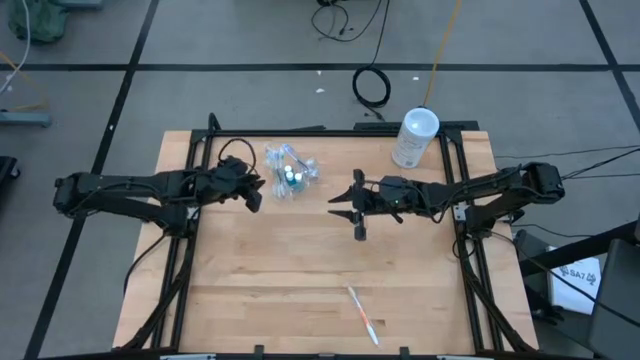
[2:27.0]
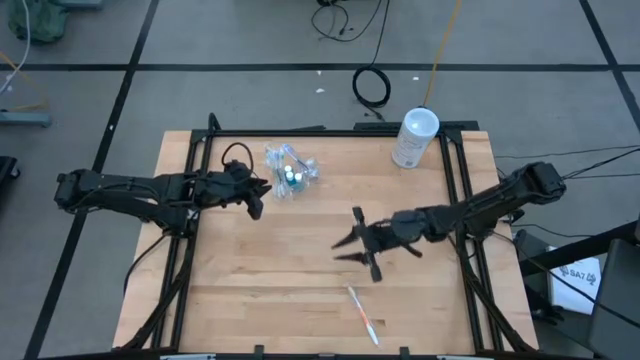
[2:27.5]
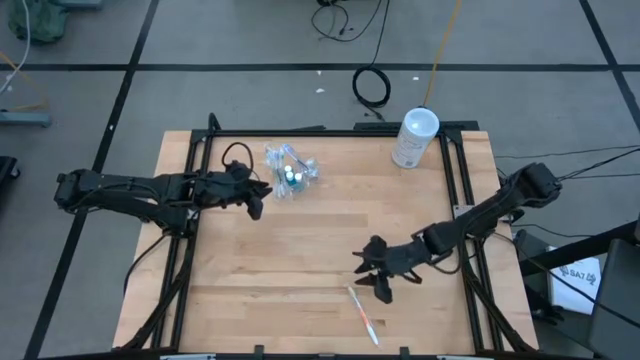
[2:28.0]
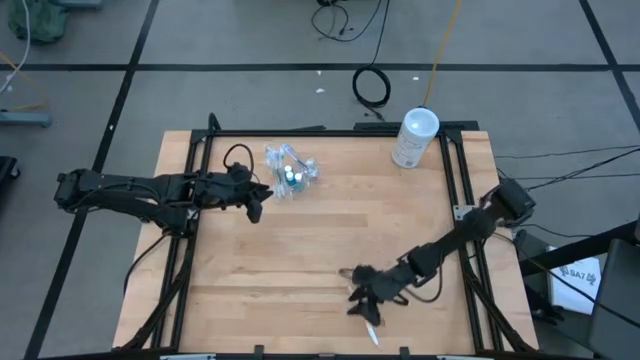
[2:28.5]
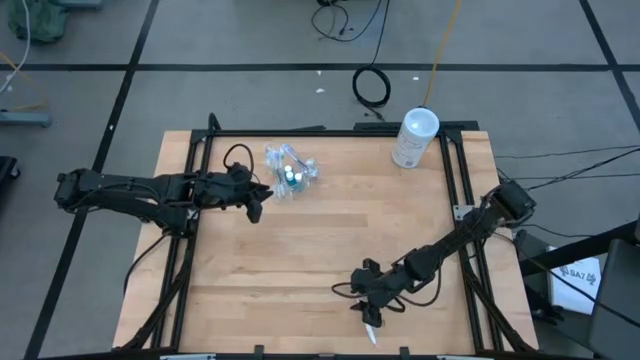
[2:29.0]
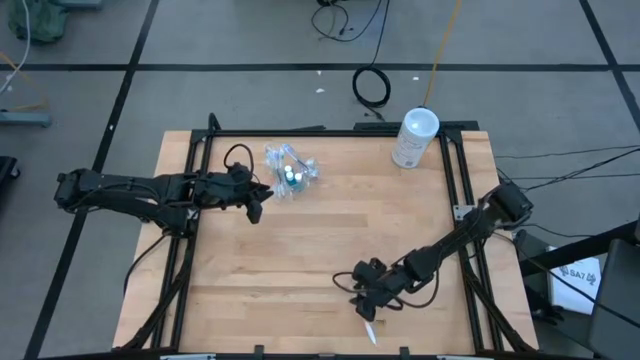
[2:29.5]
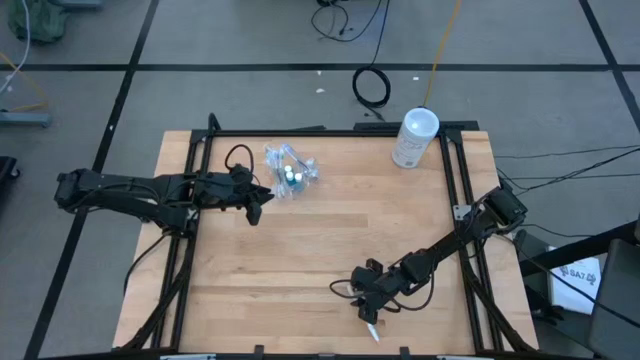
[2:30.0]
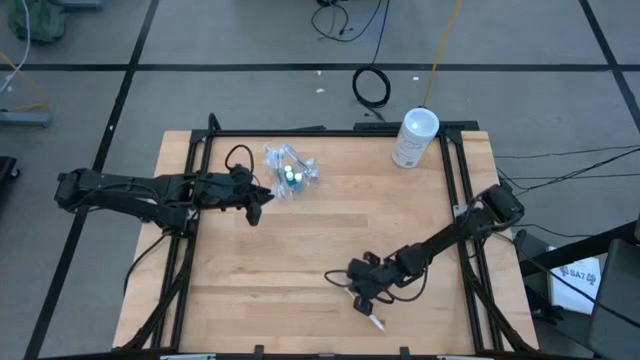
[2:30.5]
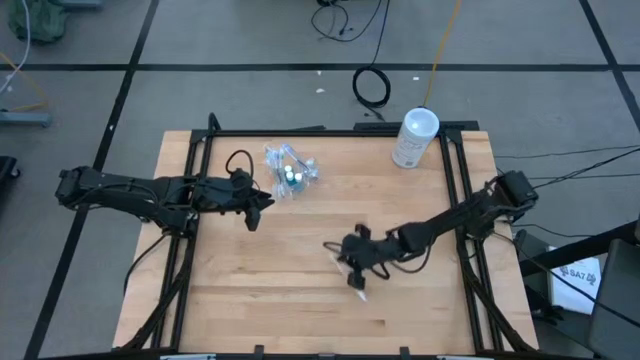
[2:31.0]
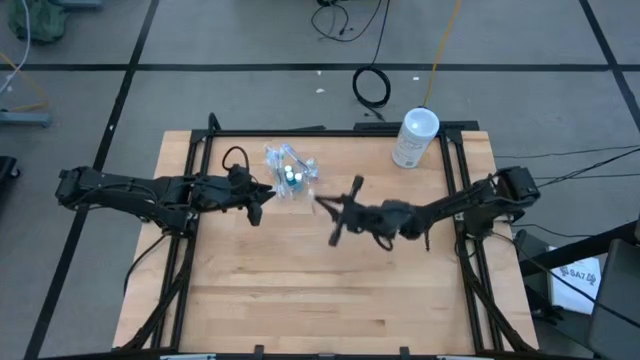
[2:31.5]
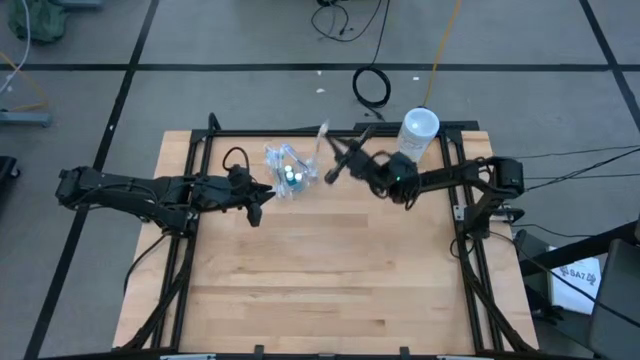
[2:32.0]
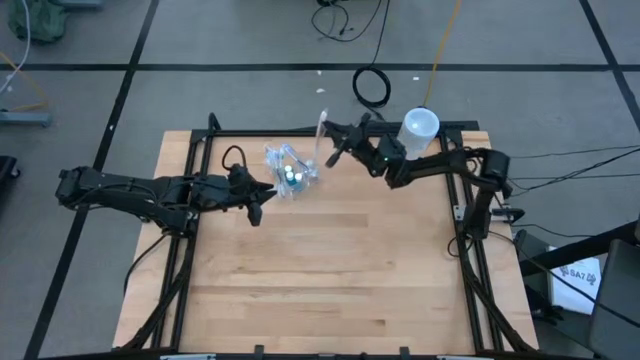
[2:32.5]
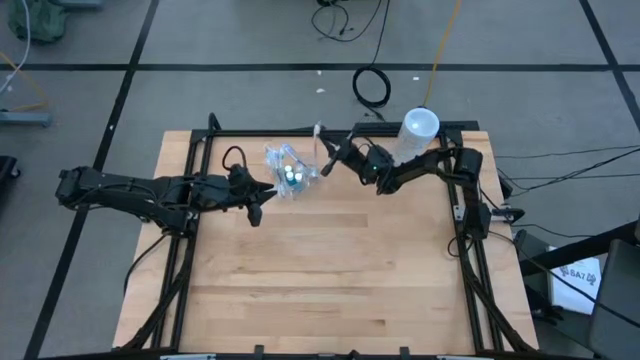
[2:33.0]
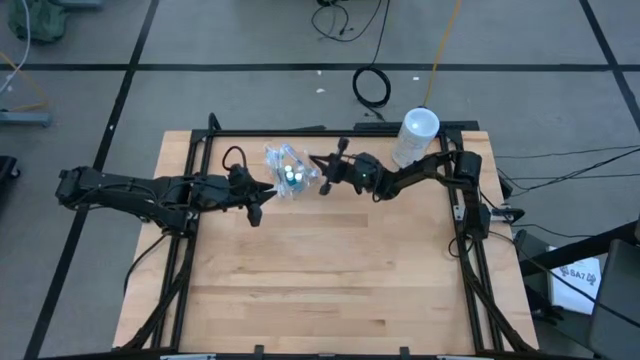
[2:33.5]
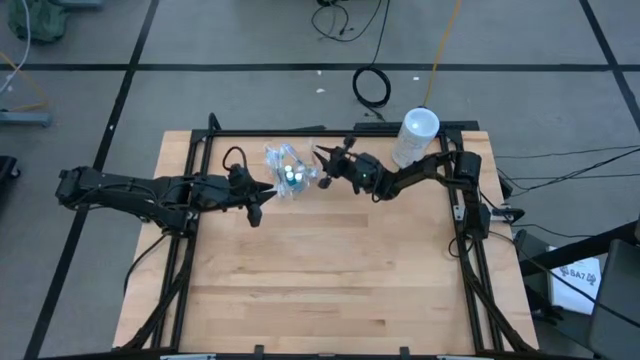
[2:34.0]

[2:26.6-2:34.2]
Task: Pick & Place toothbrushing station
Put the orange toothbrush into the transparent organizer

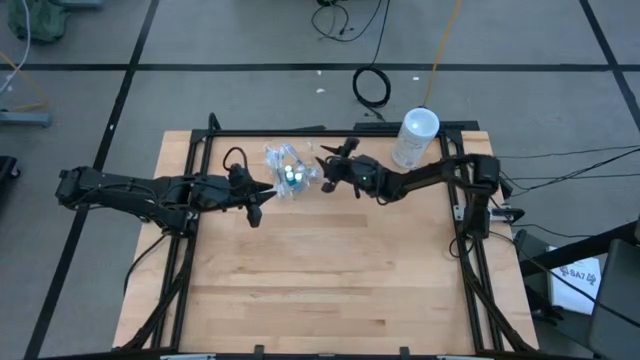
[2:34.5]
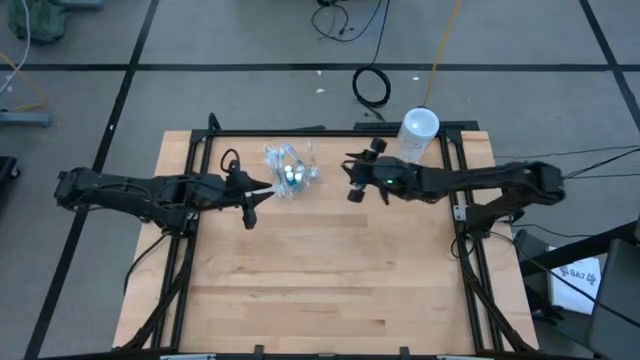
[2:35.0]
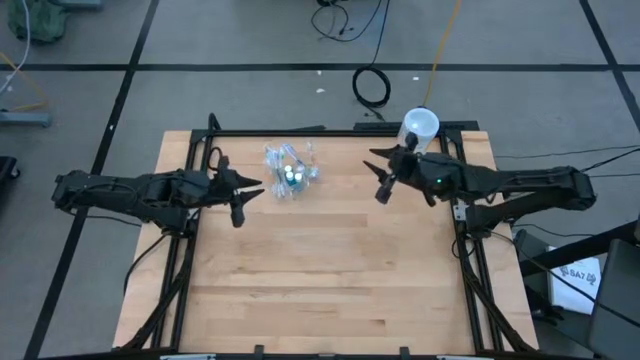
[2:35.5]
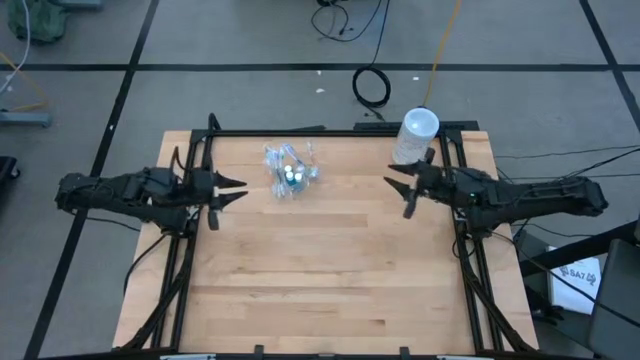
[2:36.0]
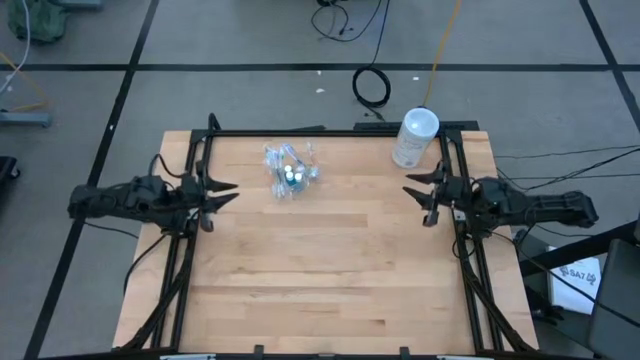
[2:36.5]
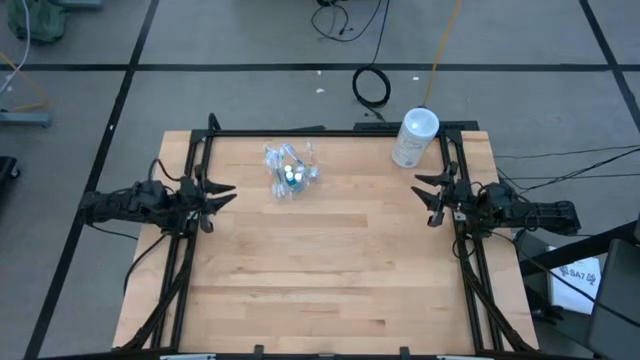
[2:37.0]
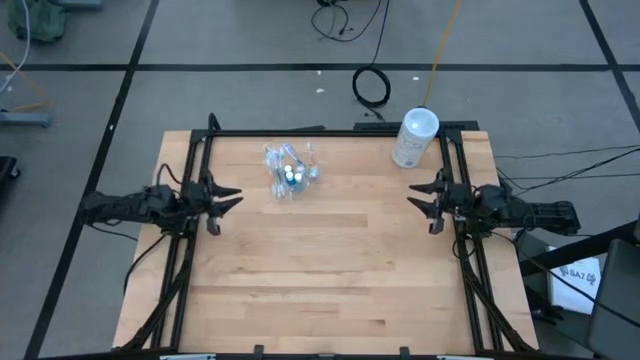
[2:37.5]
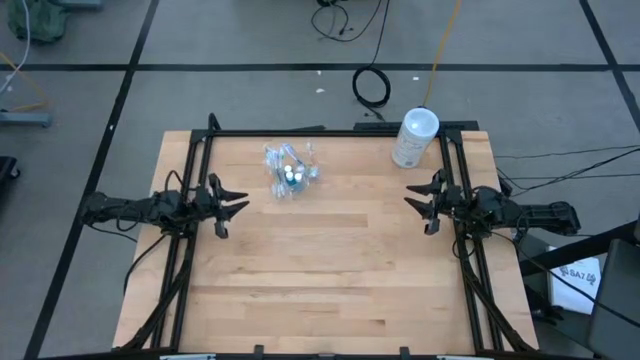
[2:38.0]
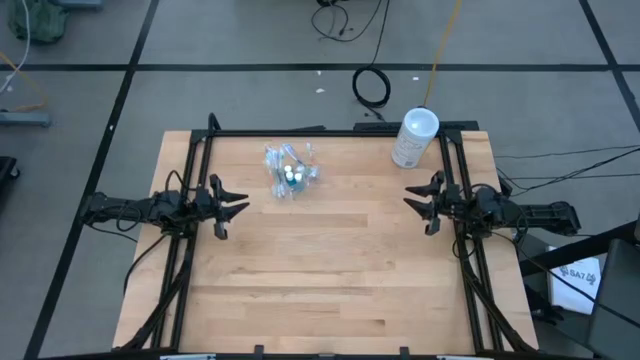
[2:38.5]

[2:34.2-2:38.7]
Return to Home Position

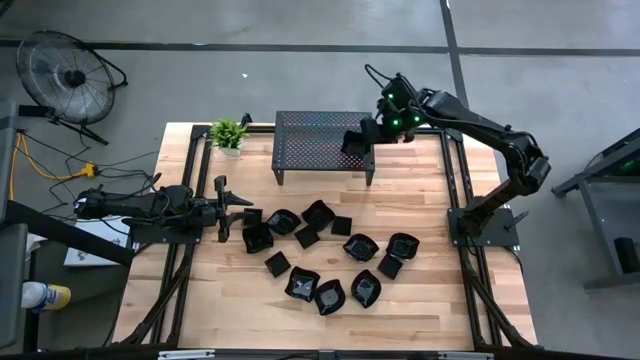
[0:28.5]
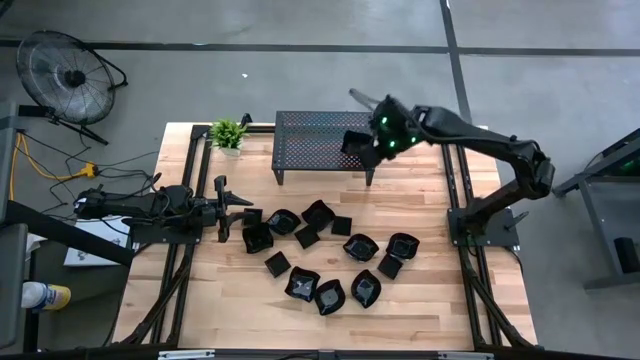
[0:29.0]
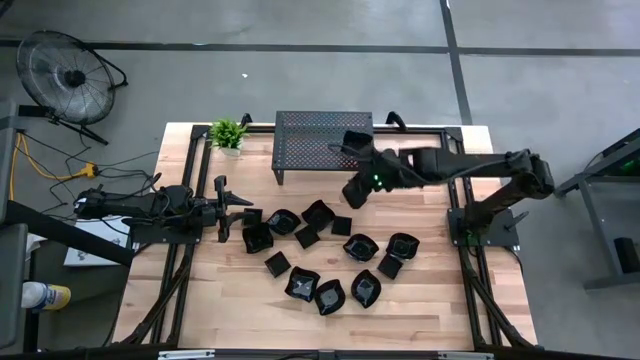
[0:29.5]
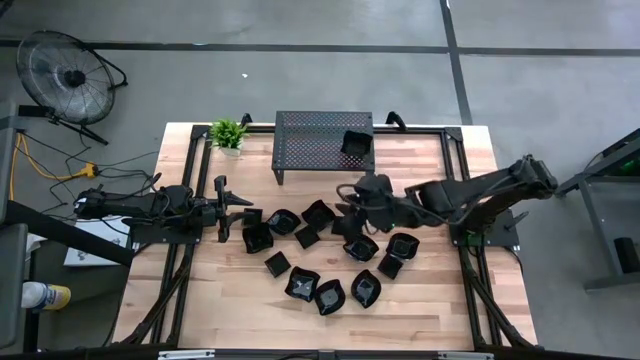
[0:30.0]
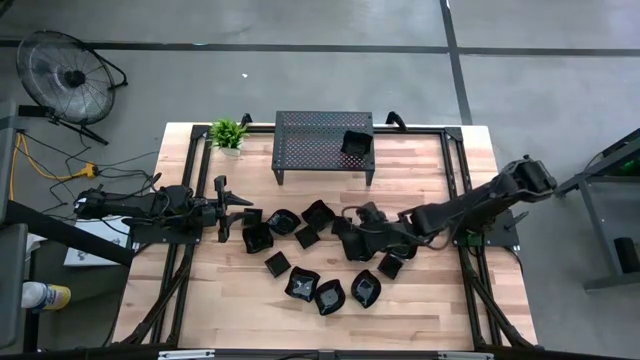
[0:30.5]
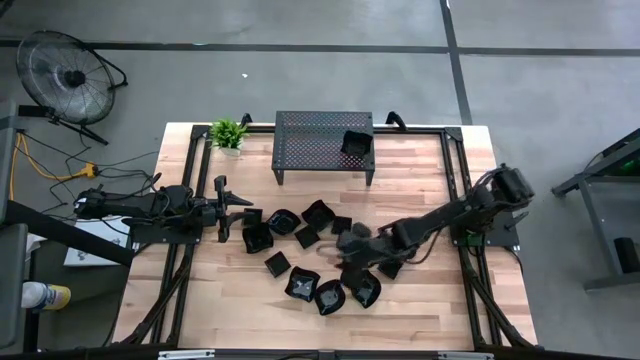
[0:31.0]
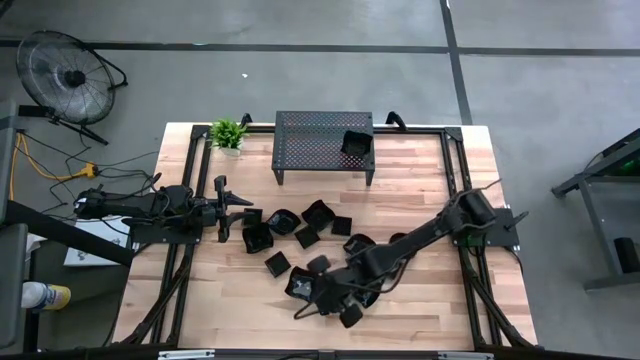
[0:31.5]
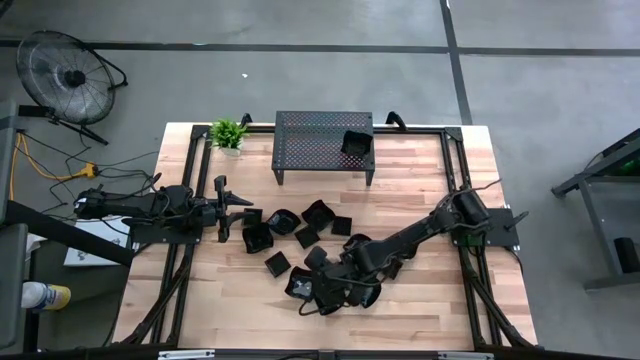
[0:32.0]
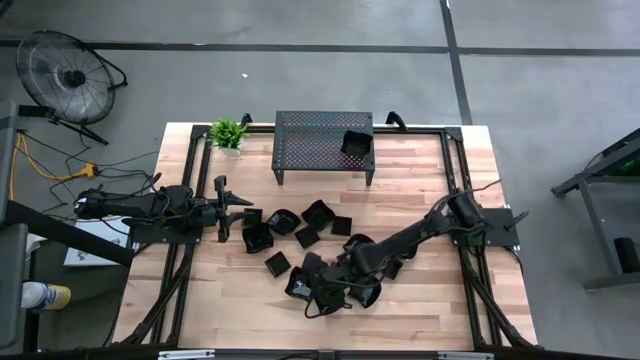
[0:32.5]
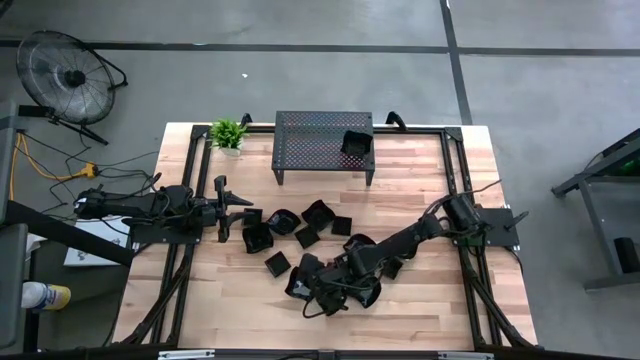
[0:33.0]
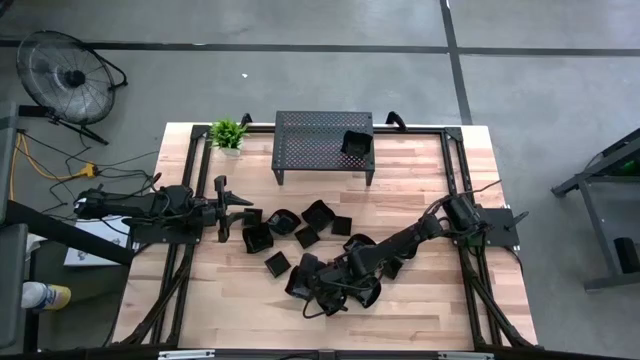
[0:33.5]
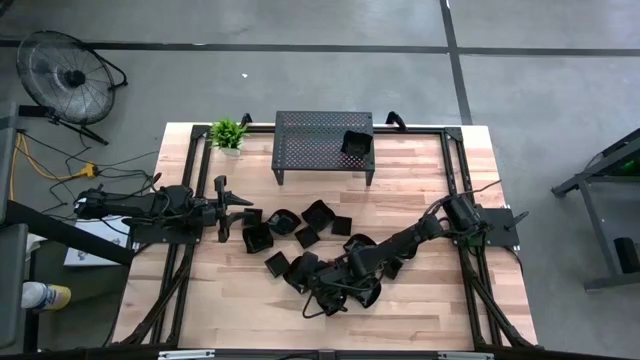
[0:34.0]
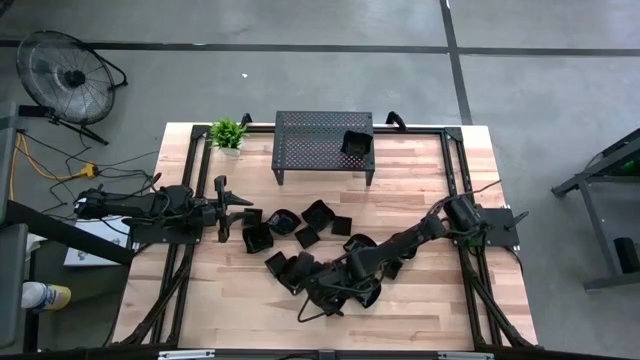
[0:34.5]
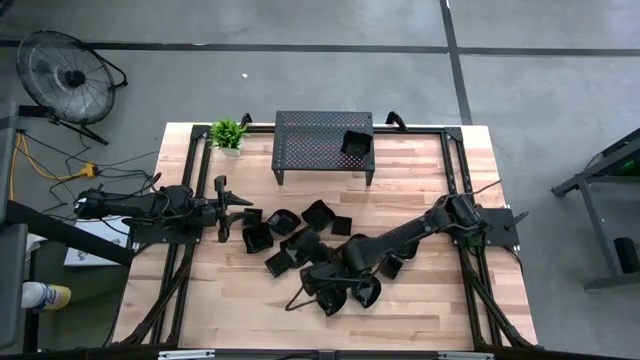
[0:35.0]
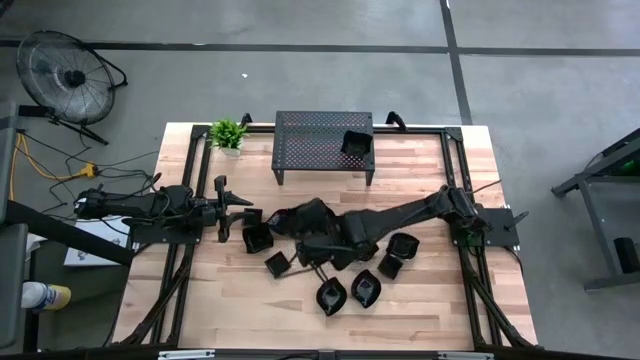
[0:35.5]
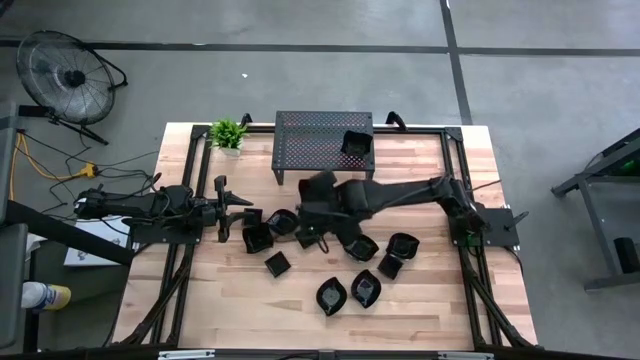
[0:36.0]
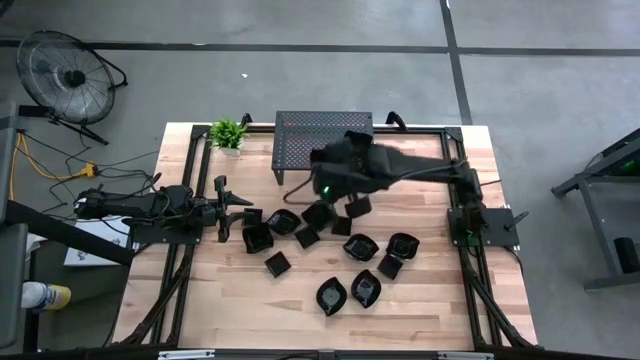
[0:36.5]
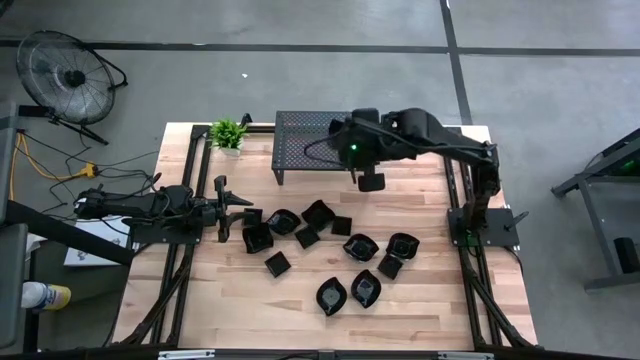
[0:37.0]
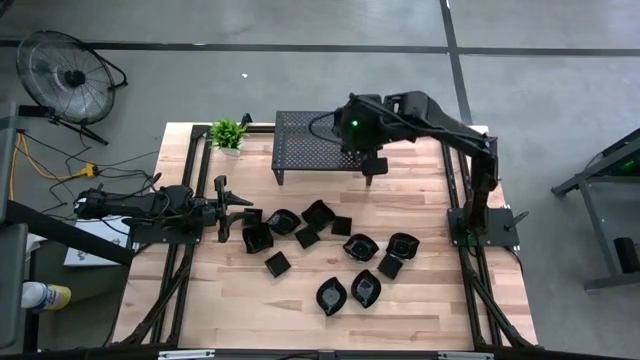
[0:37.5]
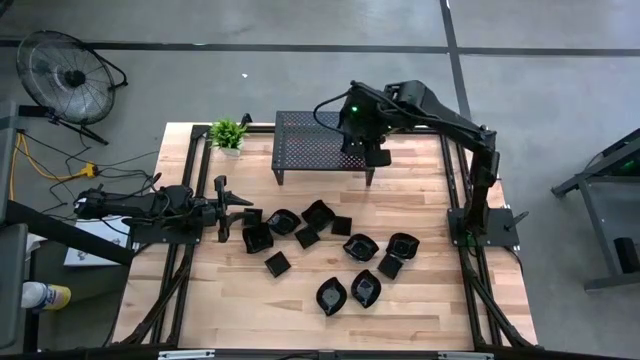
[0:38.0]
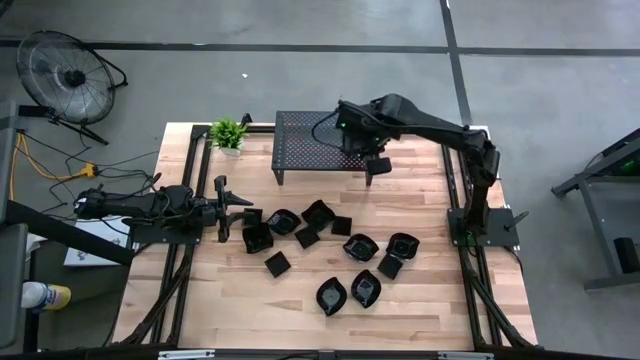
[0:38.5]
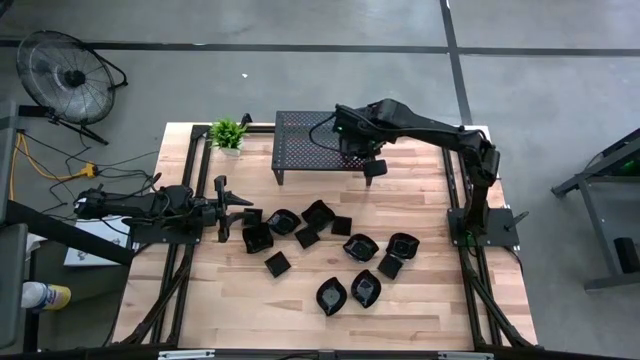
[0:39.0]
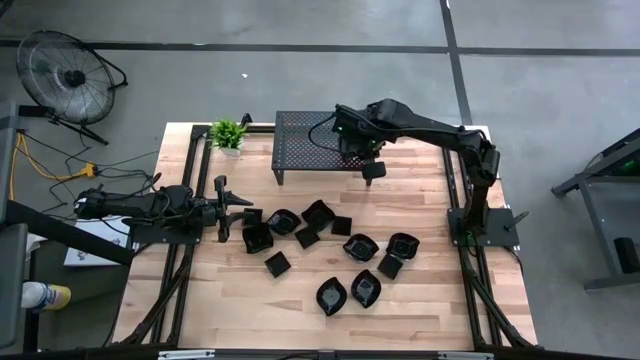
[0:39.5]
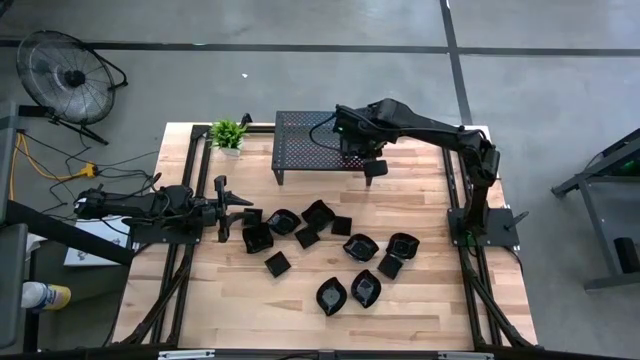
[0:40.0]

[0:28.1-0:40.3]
Task: Pick & Place Mini shaped plates
Stack the distorted square plate on top of the distorted square plate on the shelf
